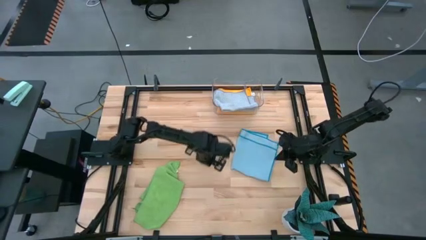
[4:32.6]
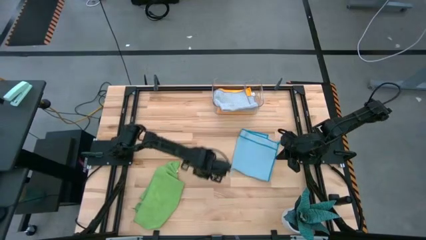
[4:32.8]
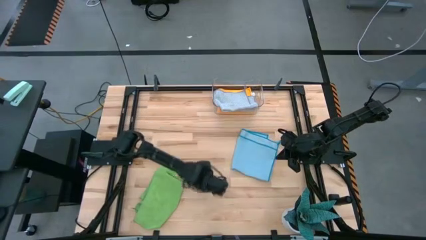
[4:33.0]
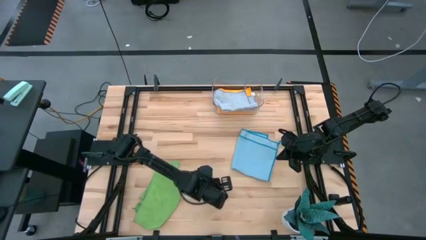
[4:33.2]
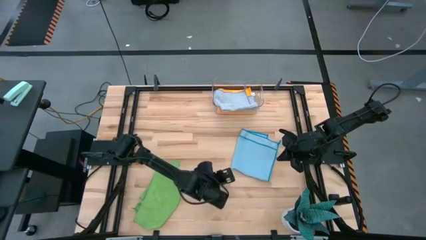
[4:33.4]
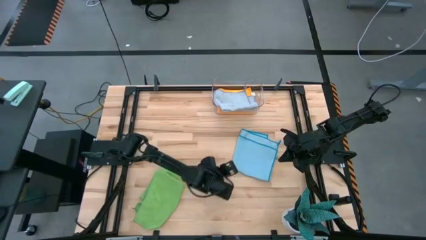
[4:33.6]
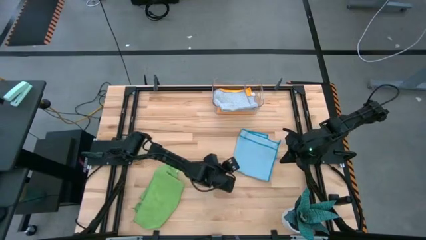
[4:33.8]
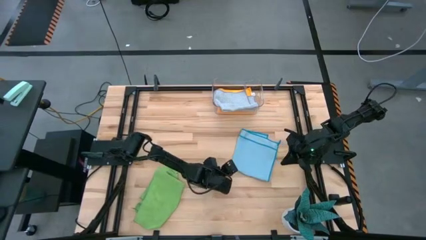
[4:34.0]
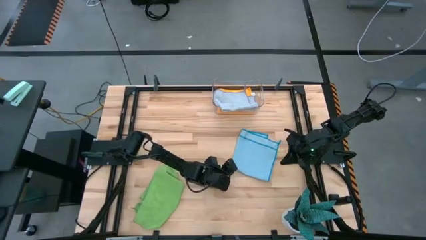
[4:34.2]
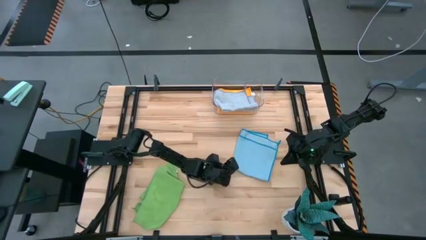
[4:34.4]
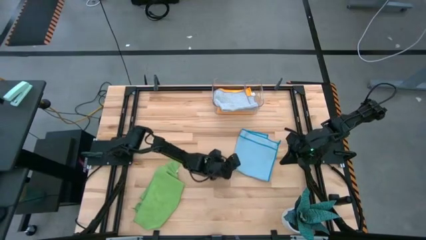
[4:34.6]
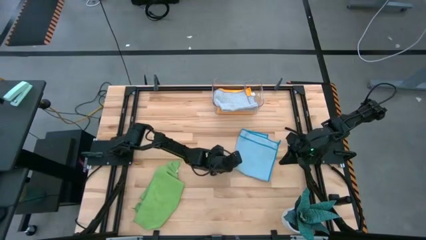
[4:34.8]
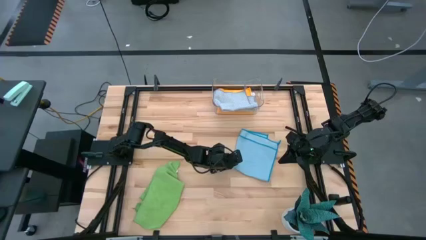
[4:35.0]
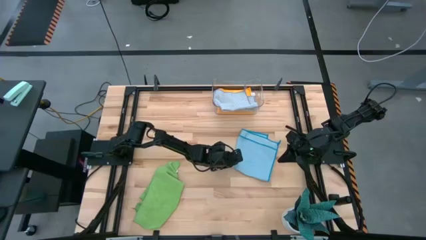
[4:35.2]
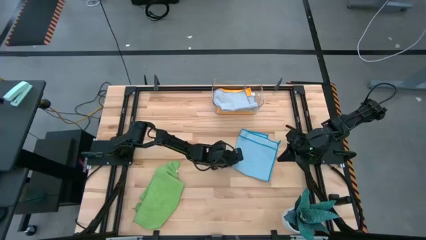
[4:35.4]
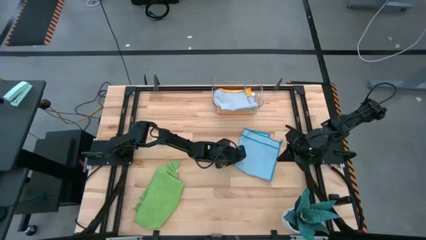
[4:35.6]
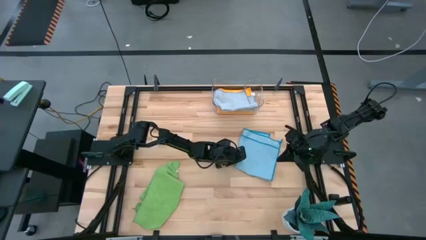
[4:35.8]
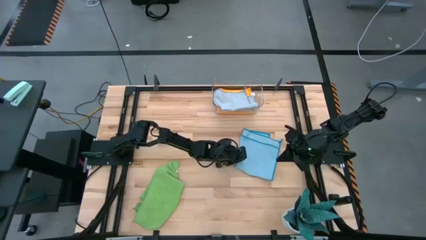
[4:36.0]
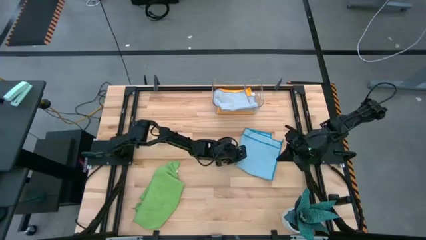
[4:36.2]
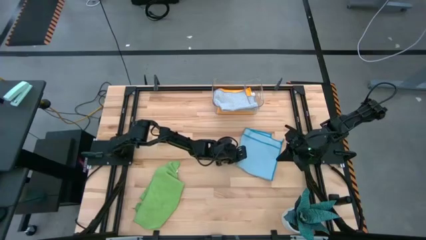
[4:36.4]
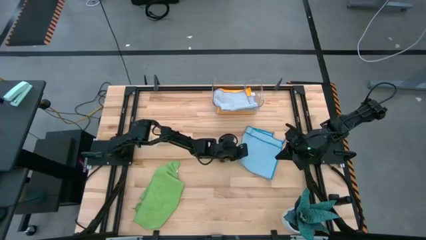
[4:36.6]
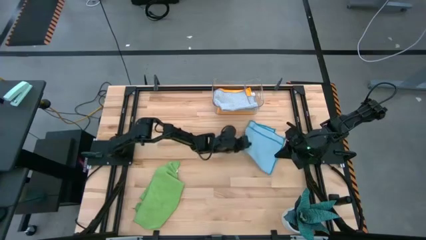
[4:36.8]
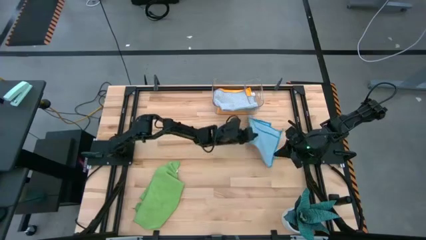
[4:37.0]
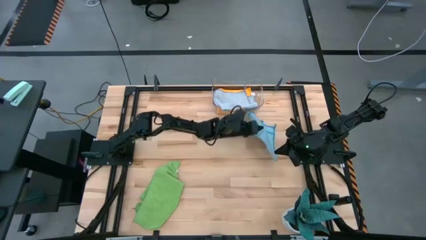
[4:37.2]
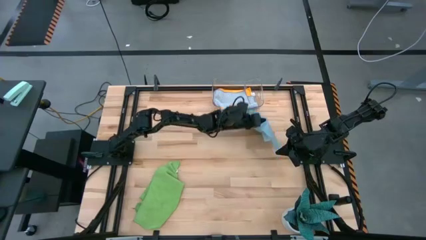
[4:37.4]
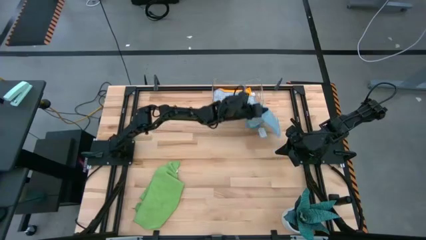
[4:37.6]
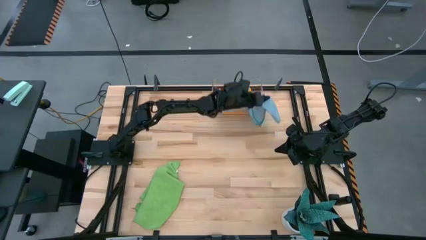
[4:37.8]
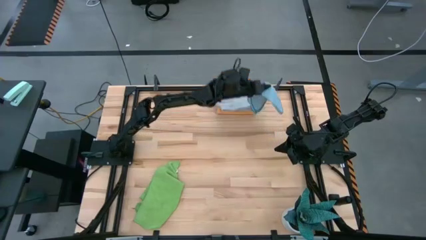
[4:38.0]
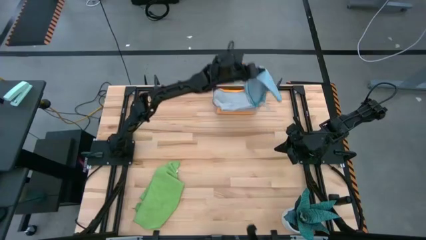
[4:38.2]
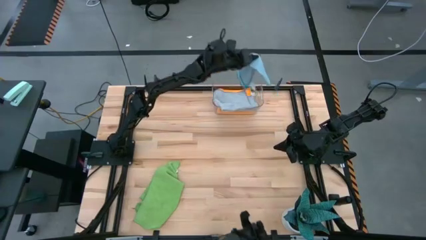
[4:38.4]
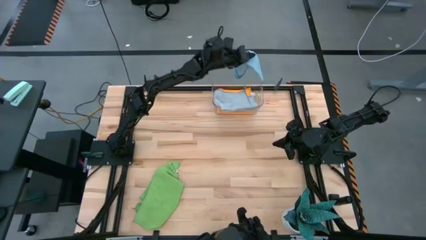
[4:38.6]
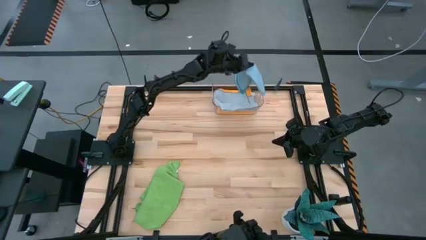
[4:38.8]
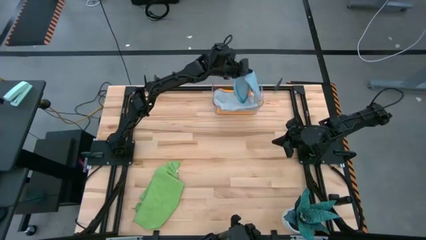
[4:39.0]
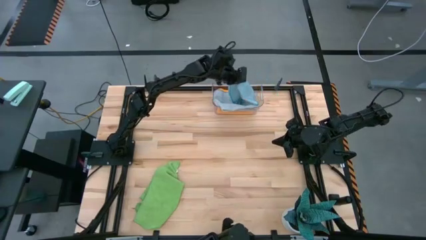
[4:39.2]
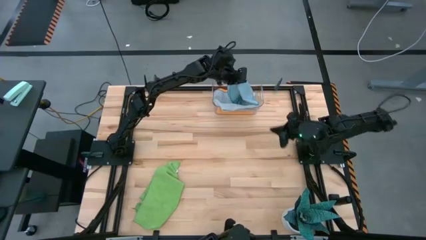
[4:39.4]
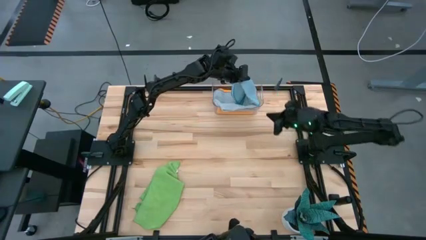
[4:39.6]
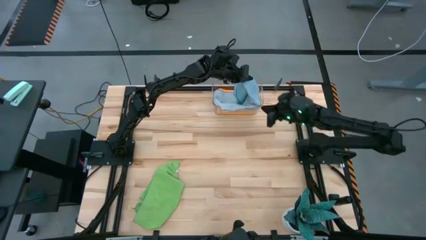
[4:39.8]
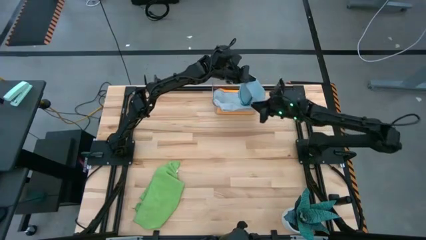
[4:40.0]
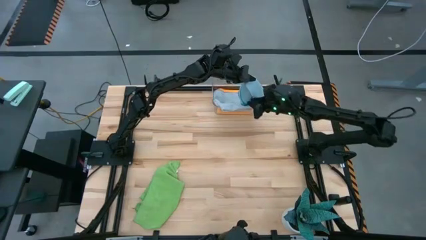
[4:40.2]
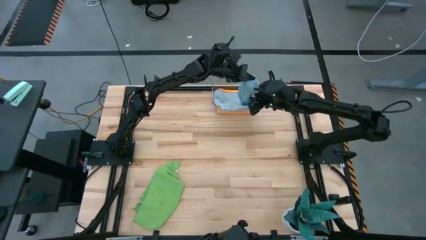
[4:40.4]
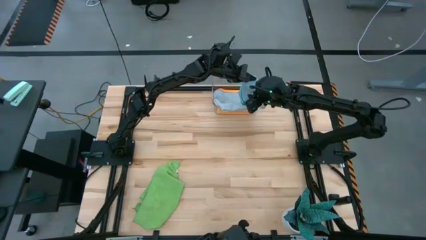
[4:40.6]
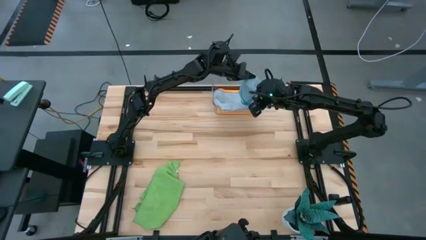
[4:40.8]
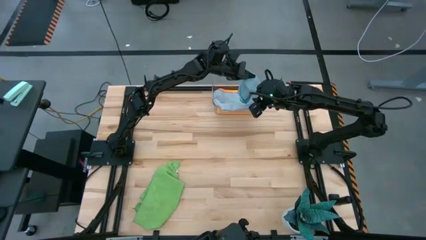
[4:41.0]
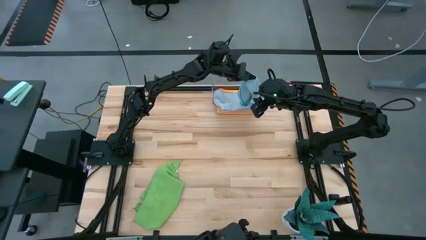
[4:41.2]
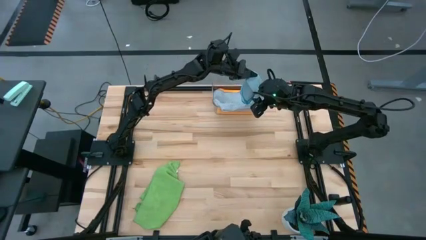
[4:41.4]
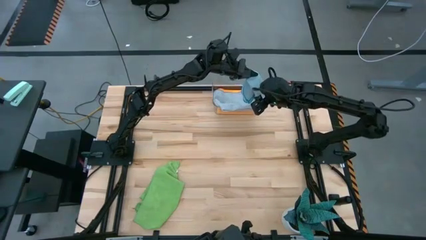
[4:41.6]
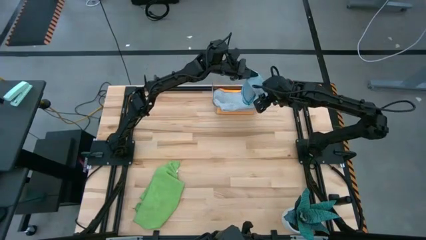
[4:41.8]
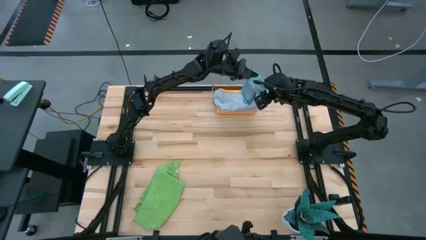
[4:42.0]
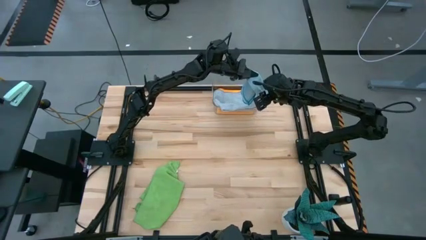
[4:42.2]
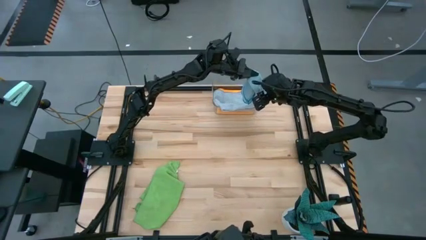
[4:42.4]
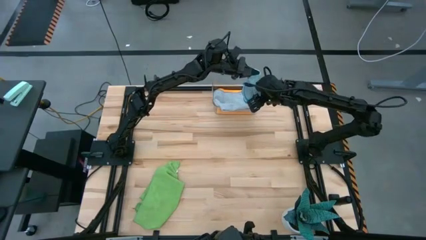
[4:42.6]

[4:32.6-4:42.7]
Task: Fold microfiber towels
Put the blue microfiber cloth into the transparent bin

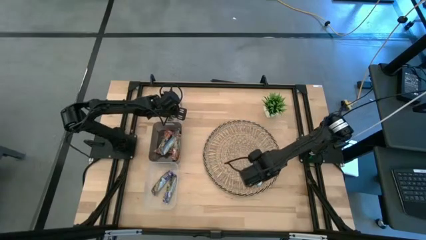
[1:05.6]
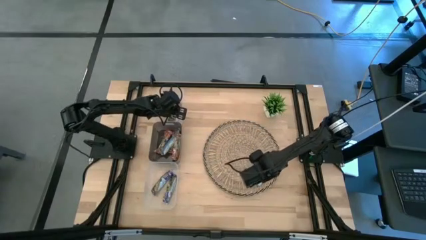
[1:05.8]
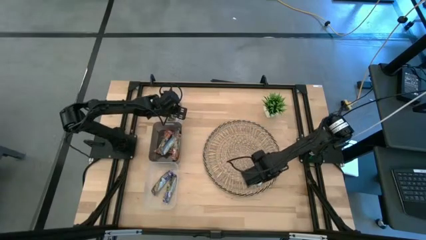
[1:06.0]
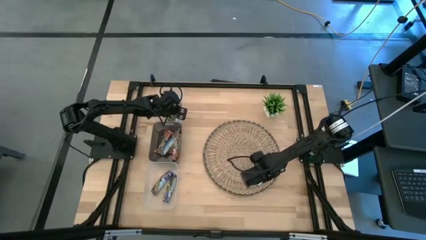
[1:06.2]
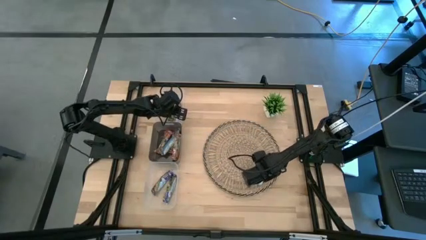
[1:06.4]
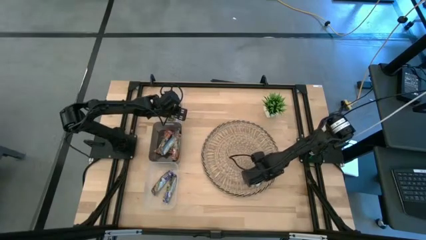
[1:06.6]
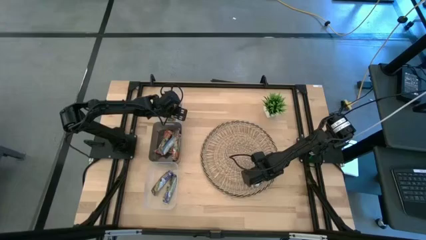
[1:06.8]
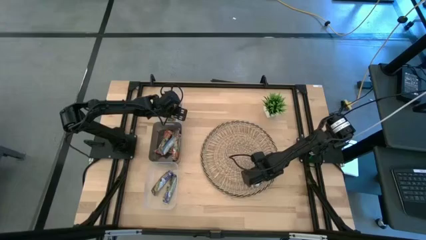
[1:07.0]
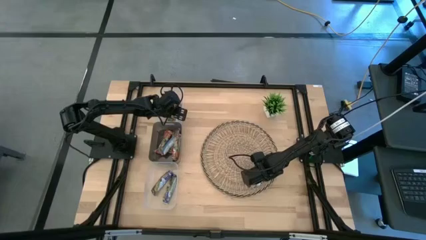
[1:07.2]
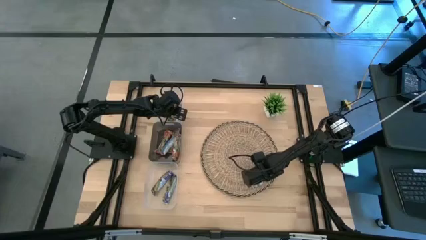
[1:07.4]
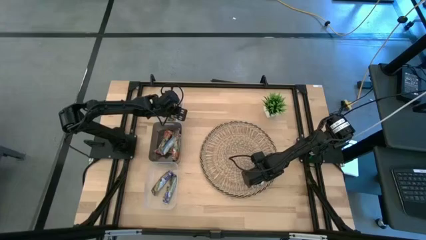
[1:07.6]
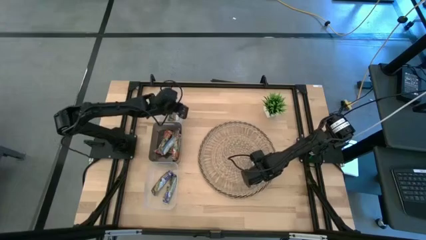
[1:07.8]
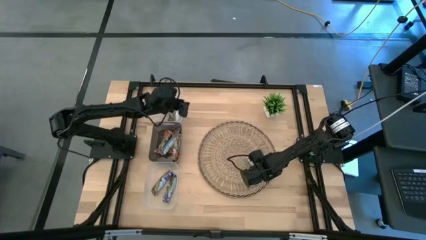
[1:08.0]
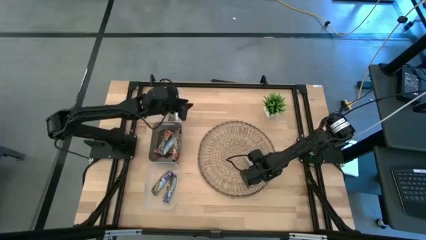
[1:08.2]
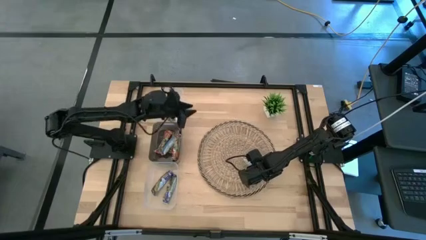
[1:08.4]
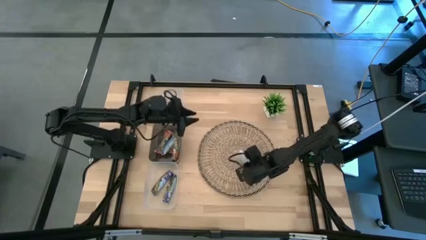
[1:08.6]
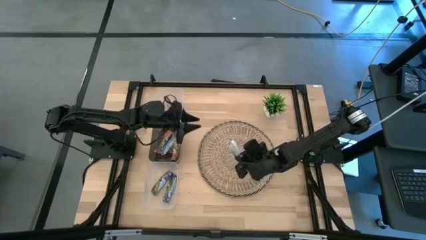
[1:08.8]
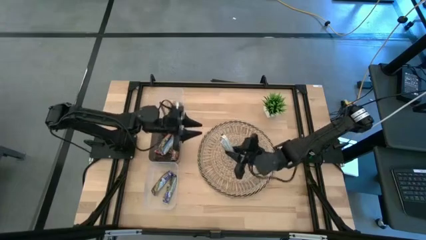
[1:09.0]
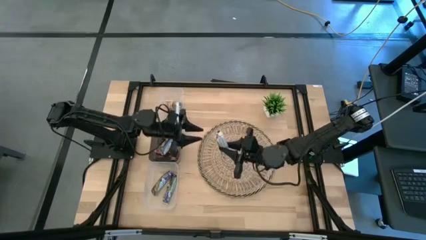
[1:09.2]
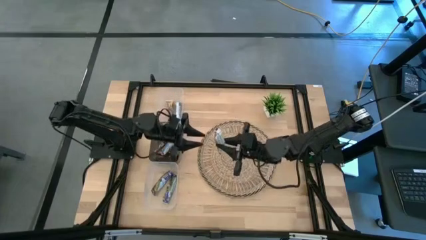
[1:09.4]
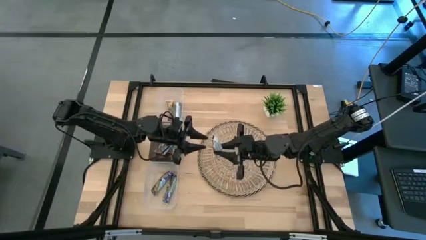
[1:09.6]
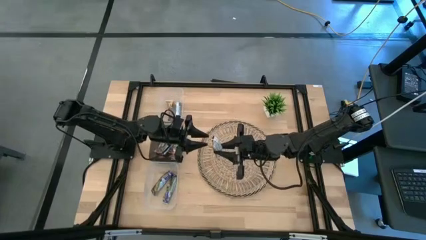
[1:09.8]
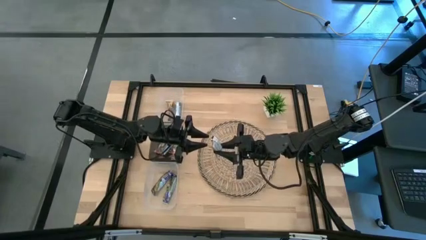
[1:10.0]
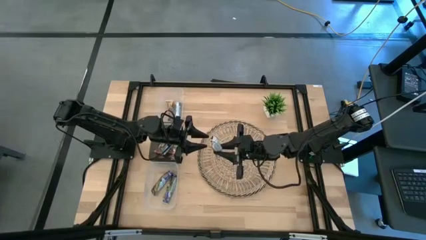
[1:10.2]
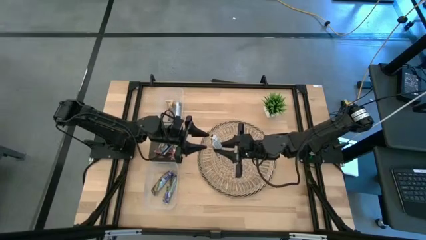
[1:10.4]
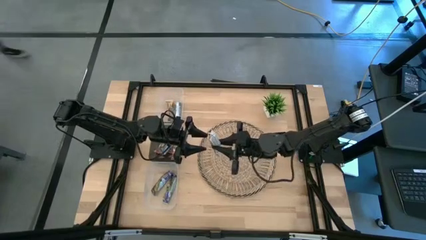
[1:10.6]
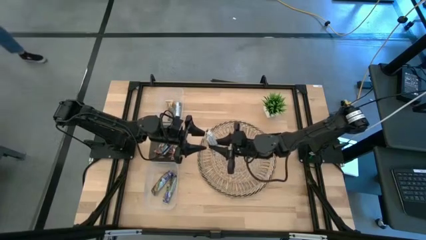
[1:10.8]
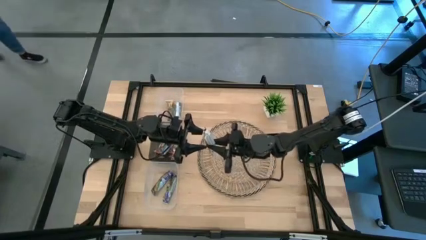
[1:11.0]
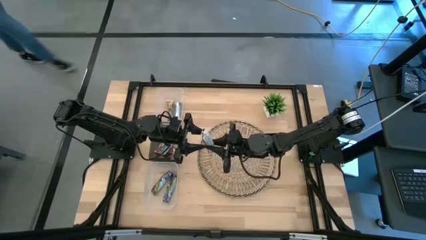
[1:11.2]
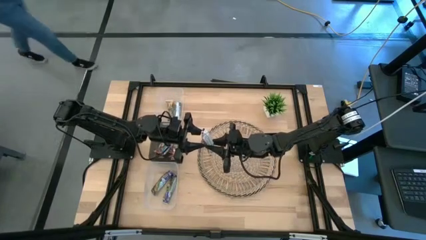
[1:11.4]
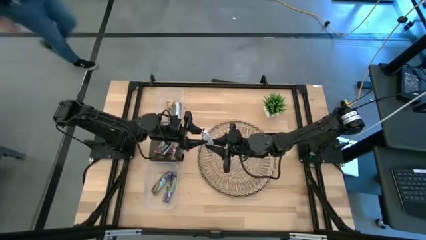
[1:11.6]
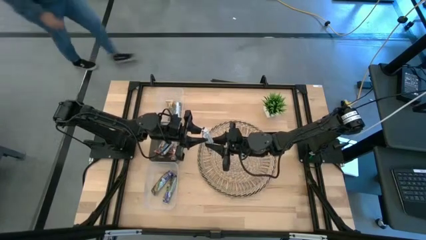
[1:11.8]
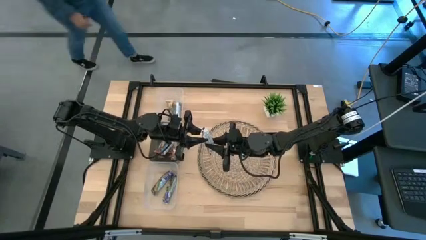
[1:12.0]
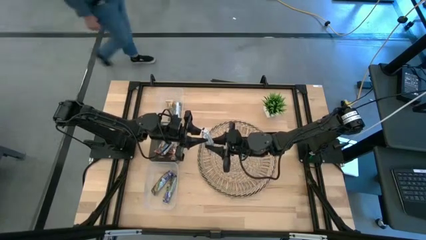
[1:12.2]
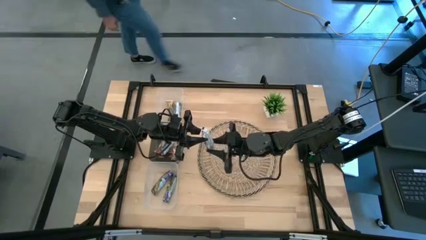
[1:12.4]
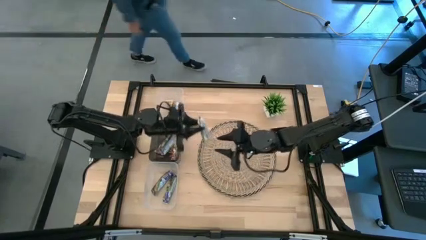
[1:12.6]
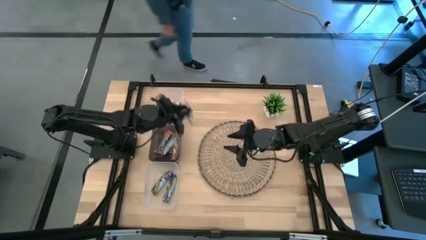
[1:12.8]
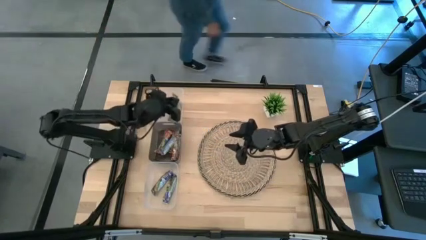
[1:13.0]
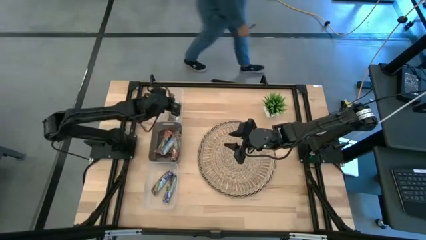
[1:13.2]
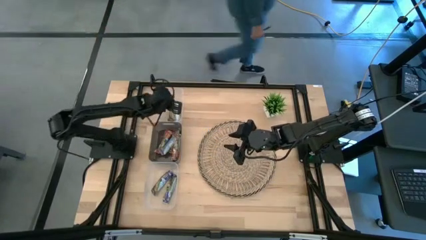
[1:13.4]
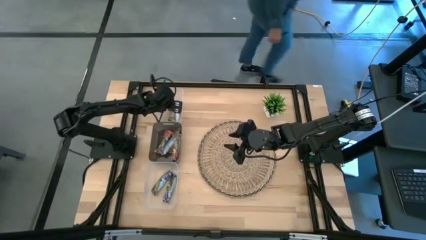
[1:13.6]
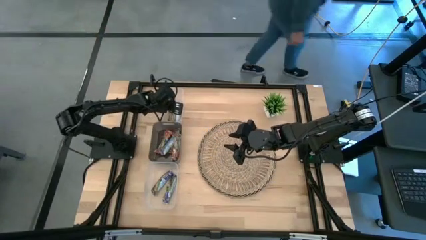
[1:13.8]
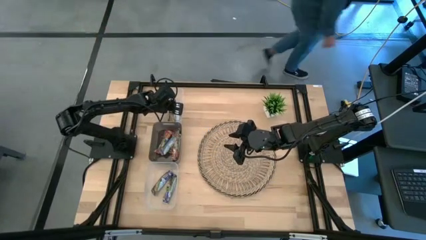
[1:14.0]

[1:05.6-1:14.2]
Task: Pick and place Granola Bars by type
Put the yellow granola bar into the top transparent bin
